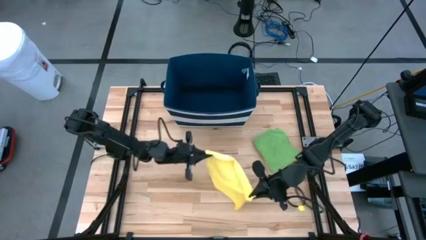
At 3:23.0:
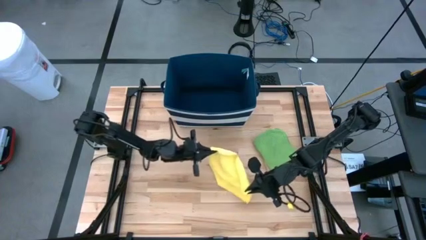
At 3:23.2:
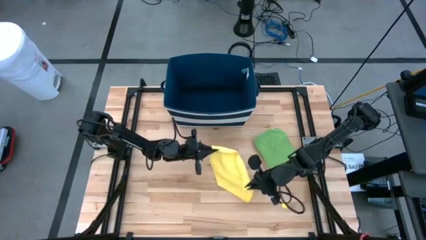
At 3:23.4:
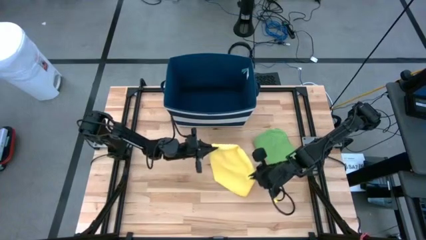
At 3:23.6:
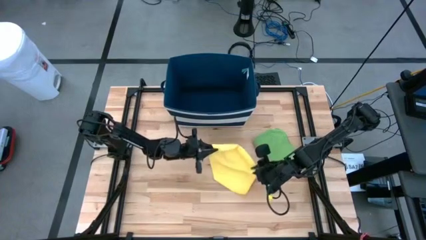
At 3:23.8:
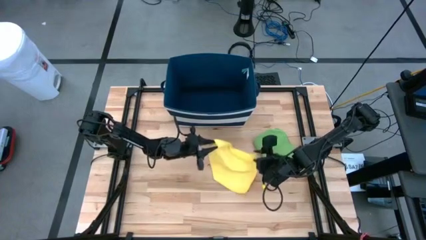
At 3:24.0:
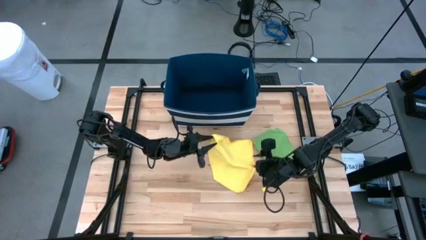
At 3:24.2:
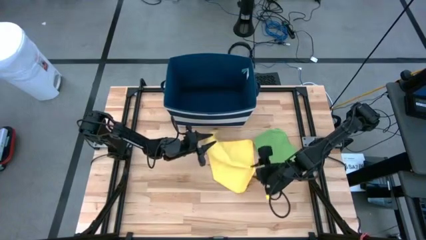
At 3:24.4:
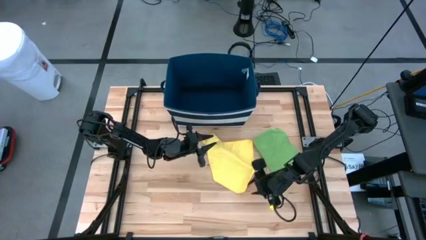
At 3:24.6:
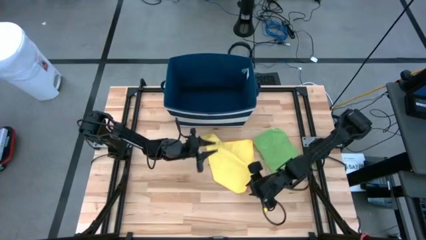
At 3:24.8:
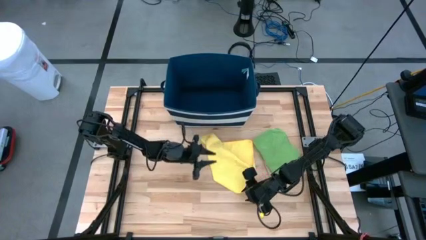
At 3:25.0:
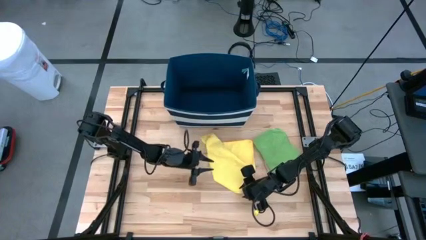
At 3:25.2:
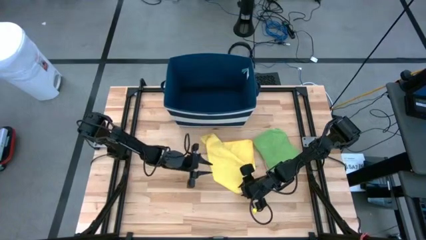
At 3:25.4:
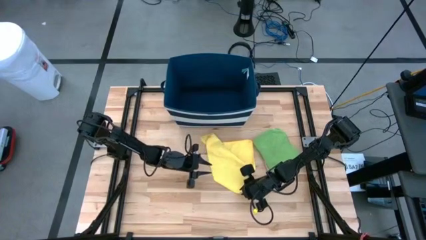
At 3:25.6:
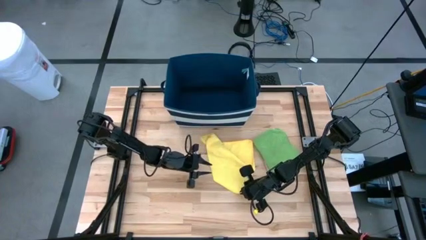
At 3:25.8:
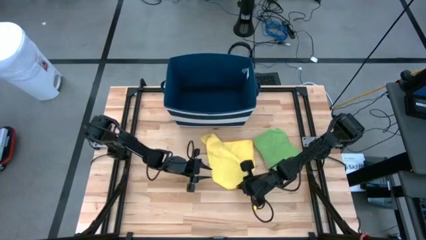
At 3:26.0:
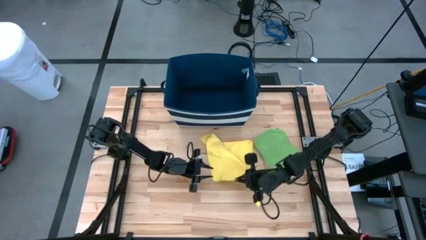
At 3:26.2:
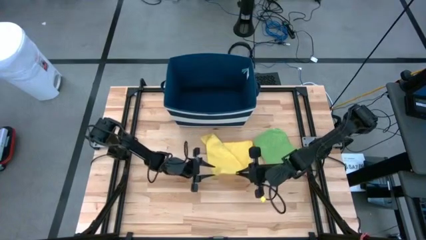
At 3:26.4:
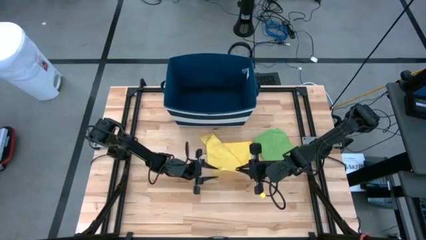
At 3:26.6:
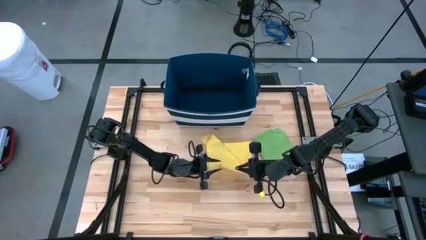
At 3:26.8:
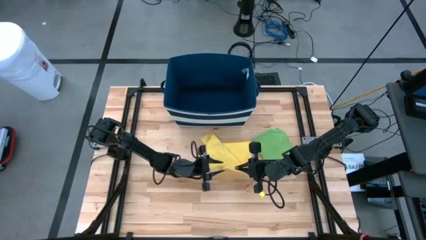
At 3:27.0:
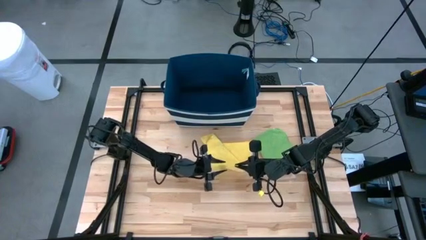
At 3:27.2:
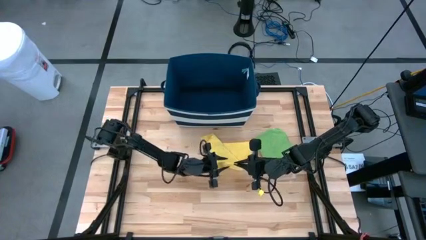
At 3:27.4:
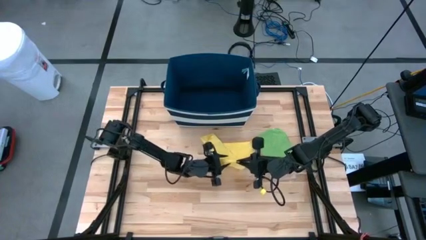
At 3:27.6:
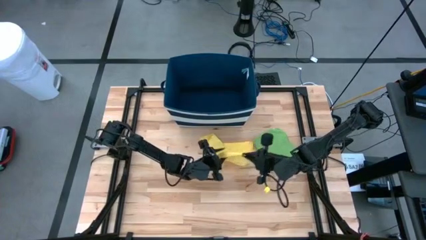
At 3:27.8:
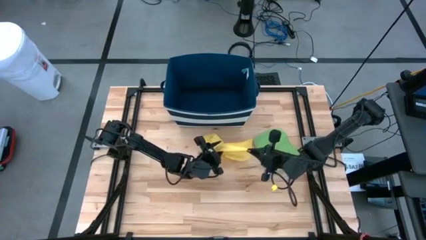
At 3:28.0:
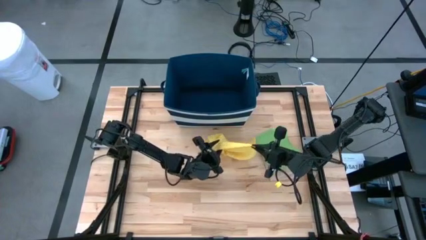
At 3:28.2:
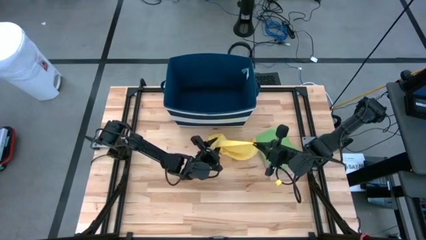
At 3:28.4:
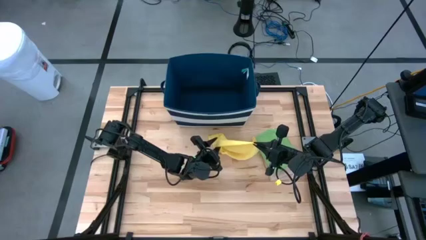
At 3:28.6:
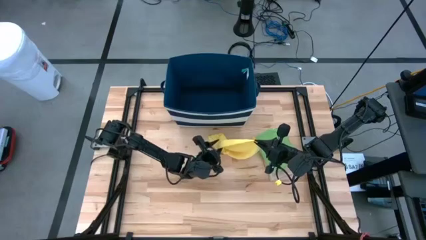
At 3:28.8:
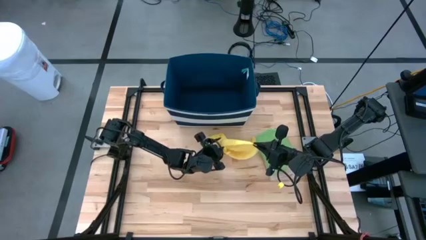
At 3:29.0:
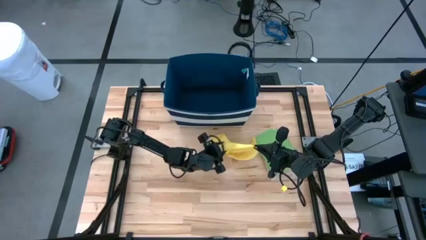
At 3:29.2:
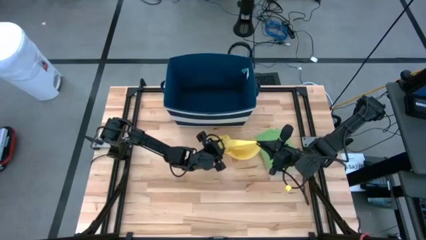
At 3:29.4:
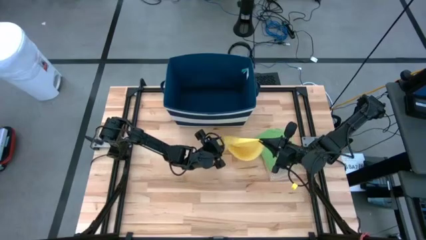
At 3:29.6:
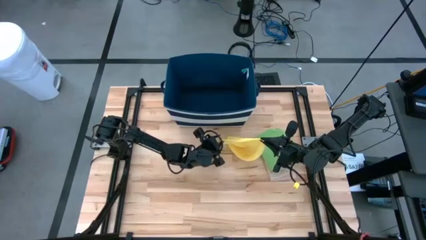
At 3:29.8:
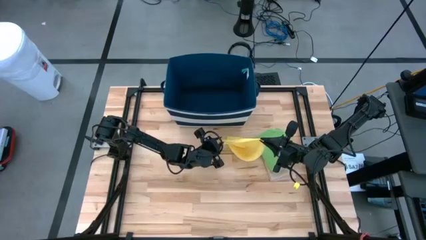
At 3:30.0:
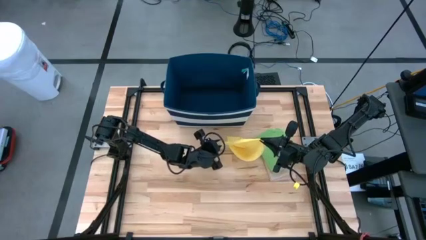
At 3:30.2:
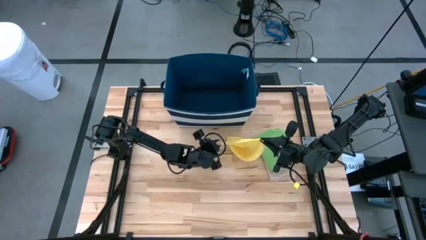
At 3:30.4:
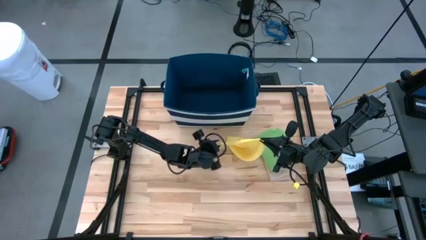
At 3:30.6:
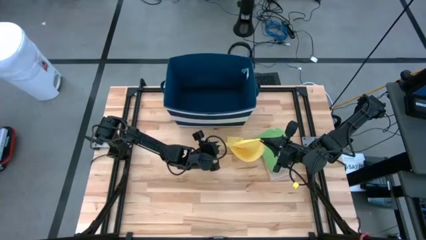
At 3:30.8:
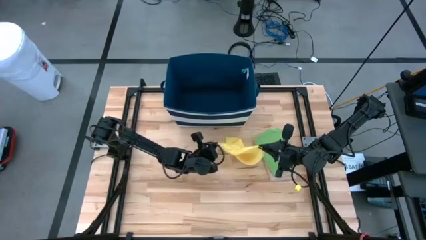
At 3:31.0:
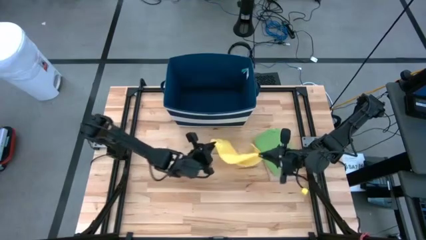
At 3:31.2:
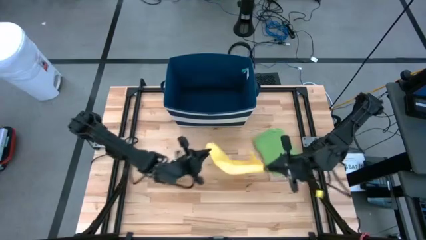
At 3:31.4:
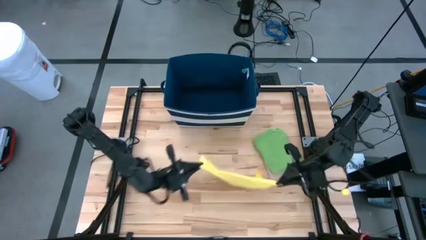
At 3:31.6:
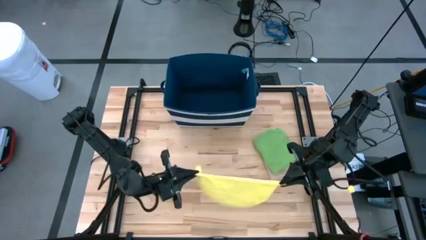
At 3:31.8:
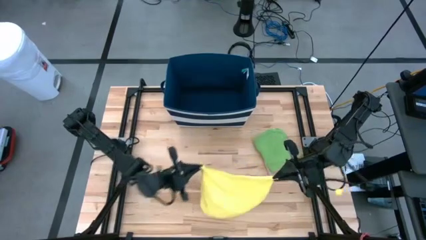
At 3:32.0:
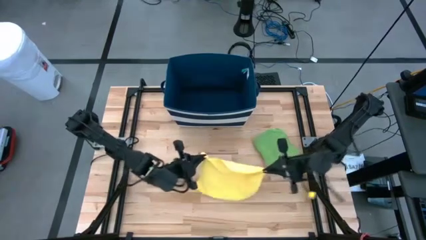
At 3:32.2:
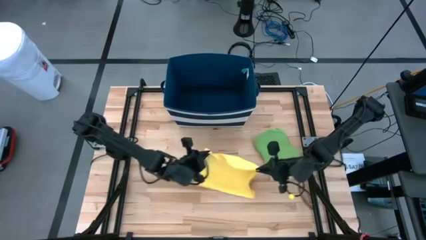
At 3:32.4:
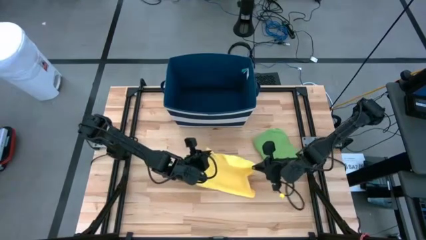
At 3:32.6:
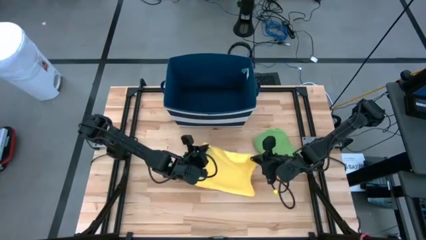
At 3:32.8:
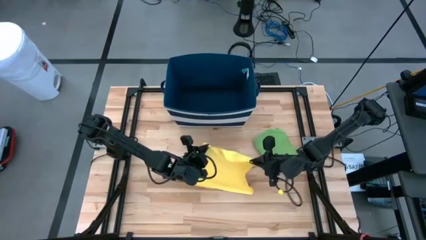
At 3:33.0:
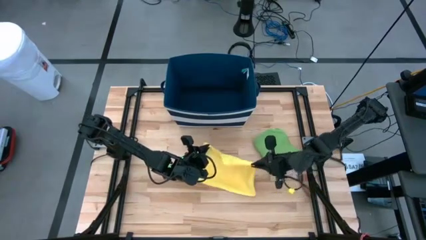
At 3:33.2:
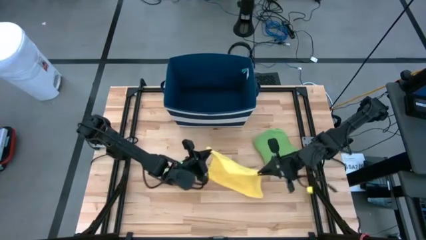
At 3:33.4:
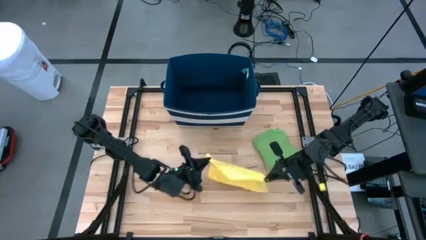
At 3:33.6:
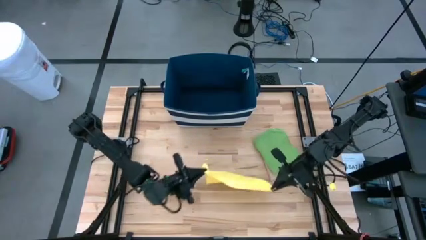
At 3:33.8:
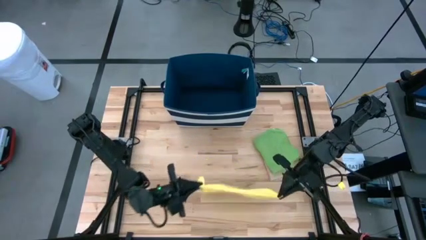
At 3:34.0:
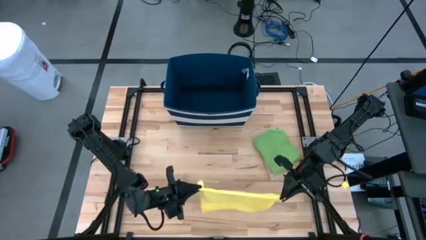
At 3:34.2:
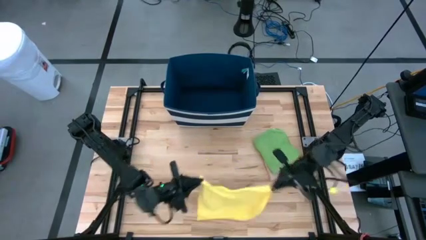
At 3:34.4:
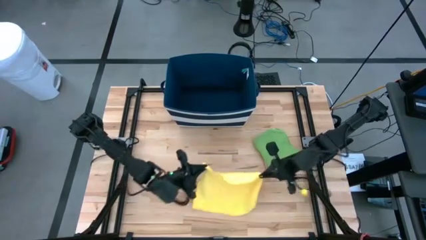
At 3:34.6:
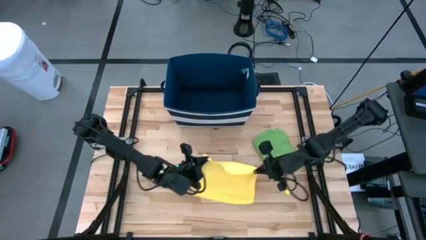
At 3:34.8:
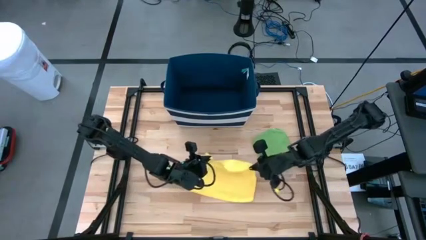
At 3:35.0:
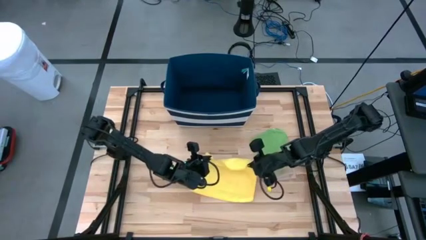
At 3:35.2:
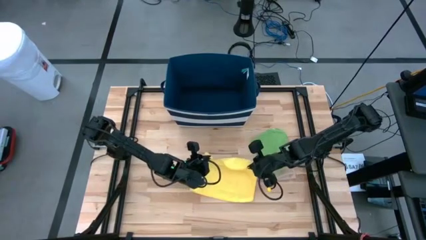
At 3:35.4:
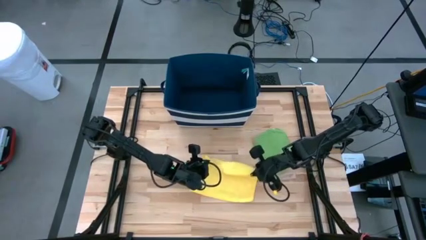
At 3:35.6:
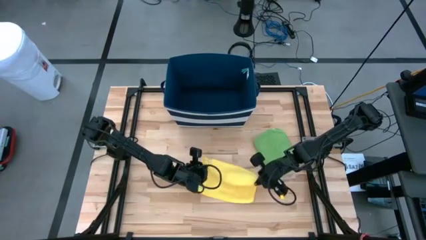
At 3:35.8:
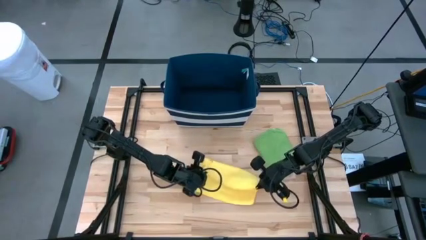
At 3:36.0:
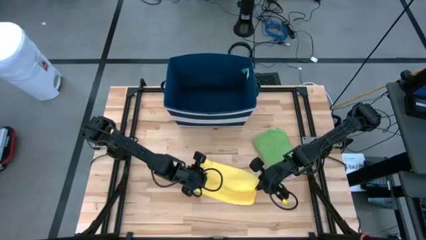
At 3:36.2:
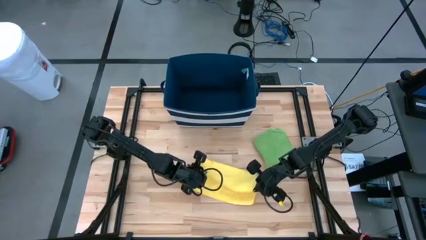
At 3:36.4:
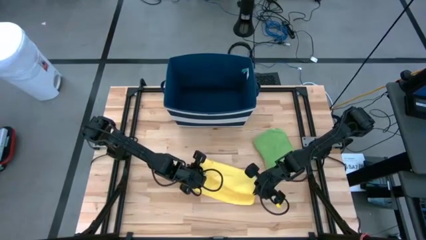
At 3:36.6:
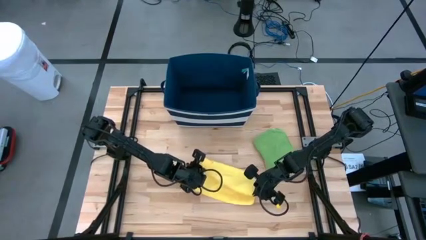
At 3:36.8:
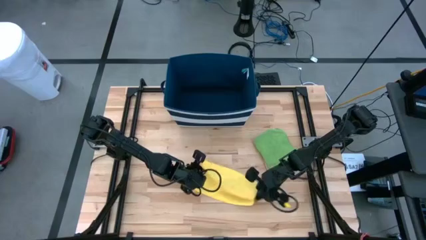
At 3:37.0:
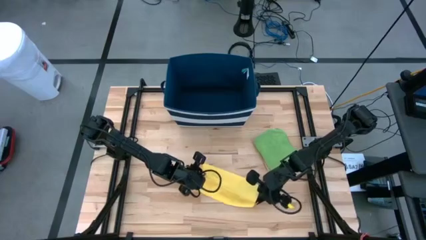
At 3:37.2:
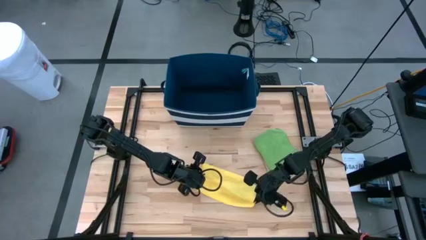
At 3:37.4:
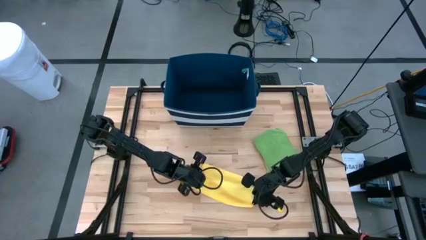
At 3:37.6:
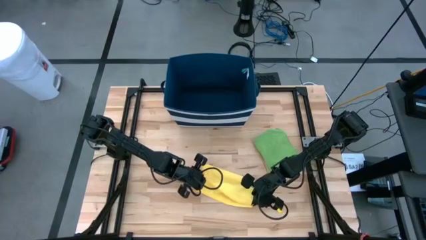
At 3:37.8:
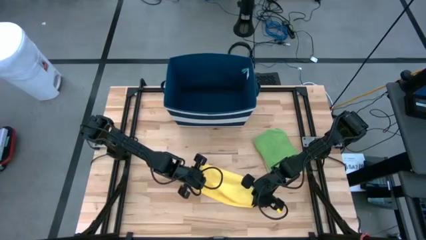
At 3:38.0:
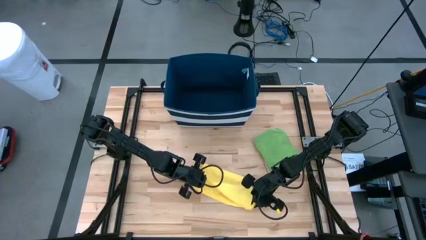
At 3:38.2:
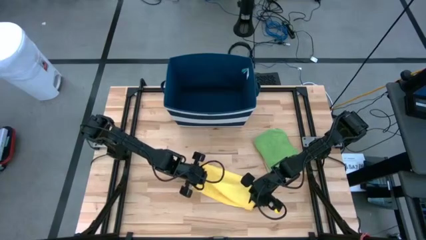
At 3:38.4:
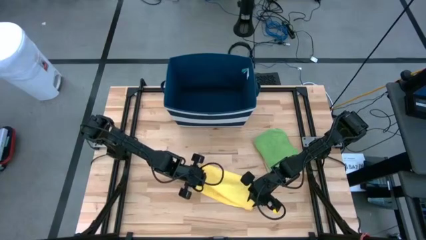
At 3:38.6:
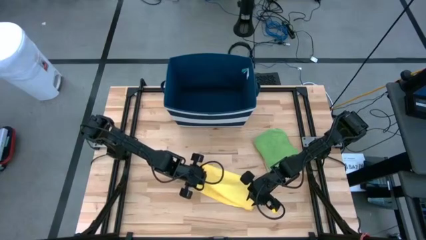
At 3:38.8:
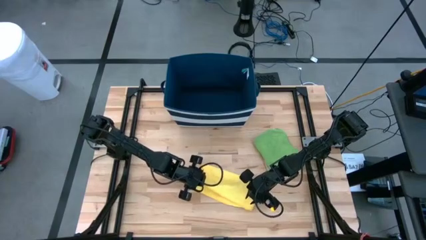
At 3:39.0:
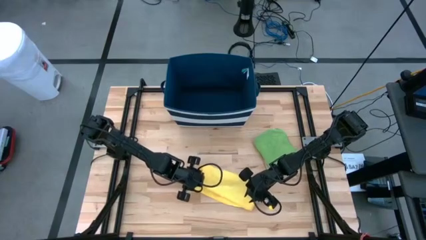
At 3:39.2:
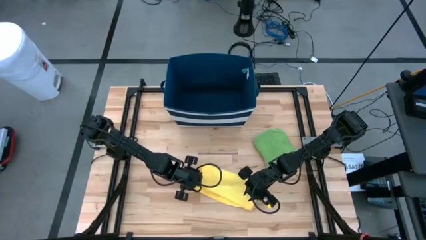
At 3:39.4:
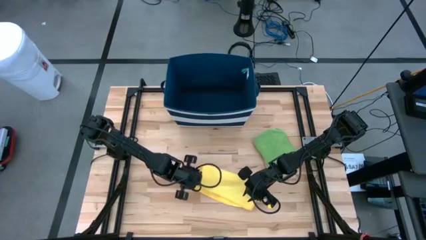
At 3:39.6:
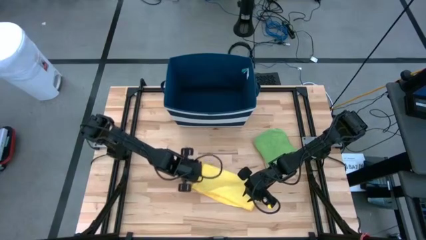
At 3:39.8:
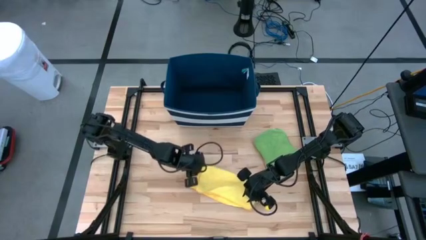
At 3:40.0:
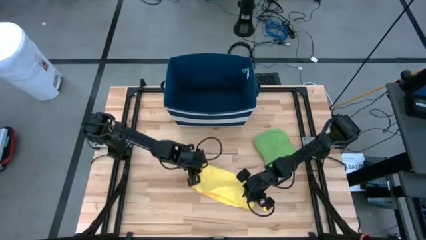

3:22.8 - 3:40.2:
Task: Fold towel
Fold the yellow towel
